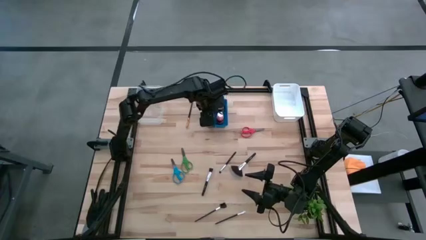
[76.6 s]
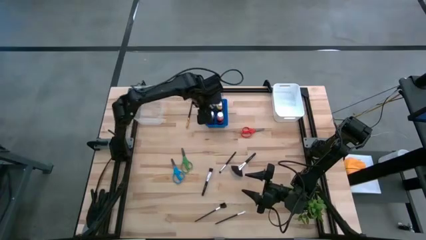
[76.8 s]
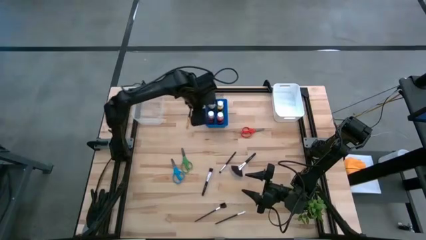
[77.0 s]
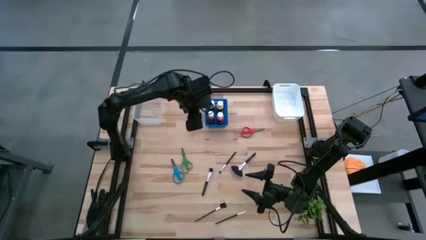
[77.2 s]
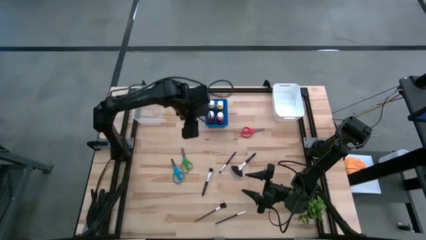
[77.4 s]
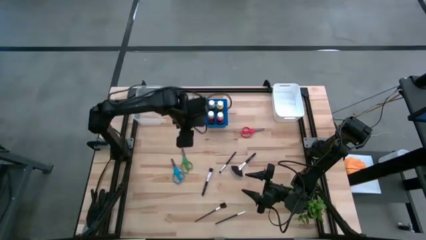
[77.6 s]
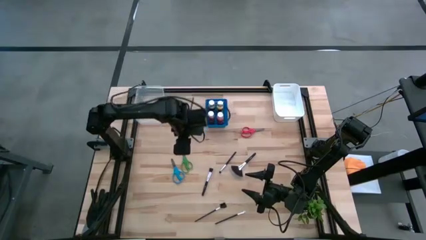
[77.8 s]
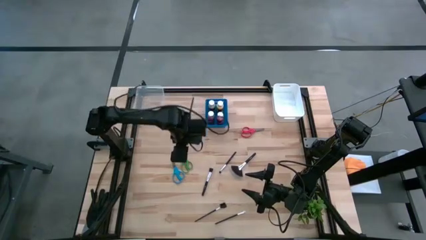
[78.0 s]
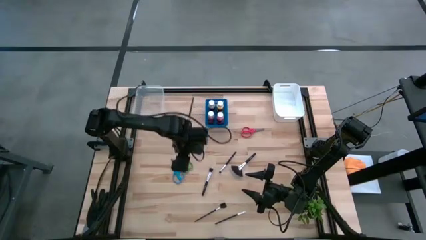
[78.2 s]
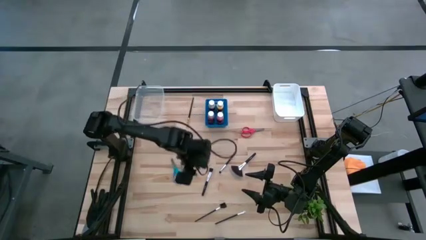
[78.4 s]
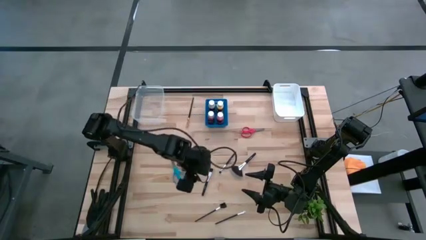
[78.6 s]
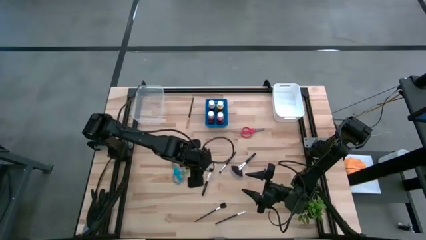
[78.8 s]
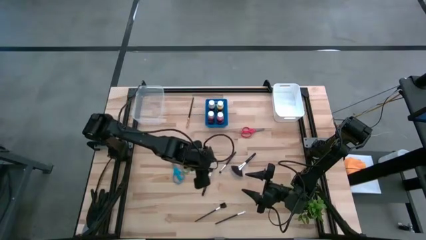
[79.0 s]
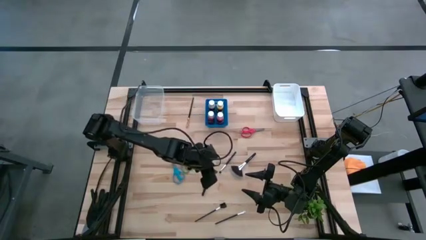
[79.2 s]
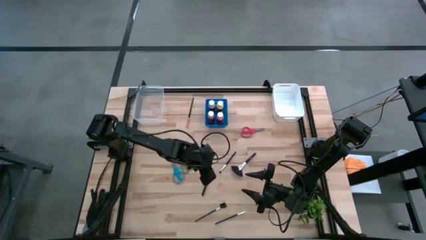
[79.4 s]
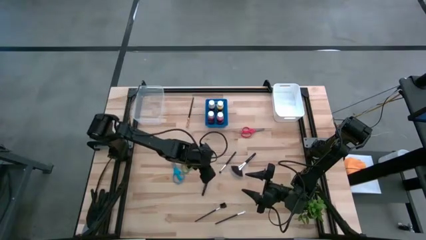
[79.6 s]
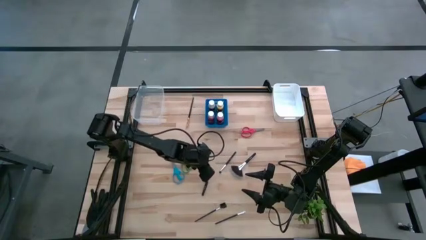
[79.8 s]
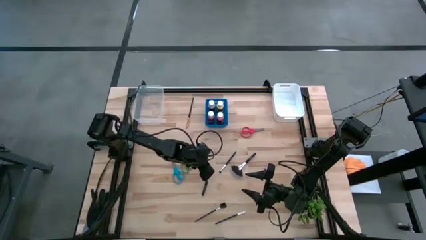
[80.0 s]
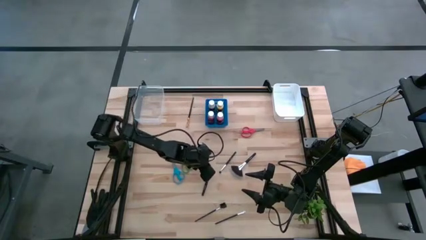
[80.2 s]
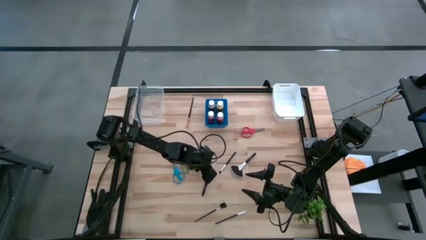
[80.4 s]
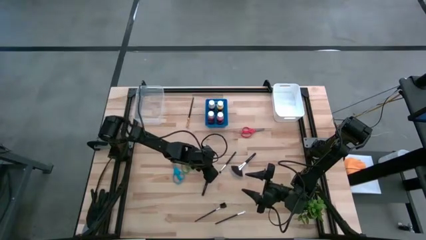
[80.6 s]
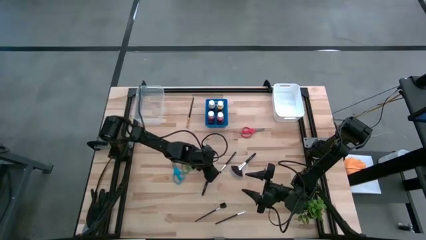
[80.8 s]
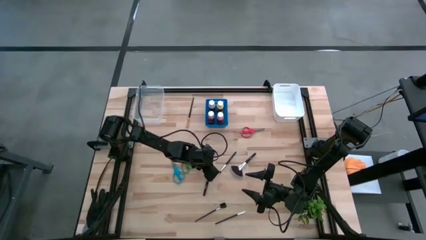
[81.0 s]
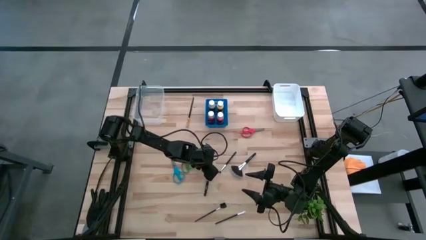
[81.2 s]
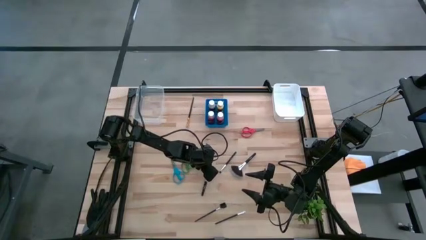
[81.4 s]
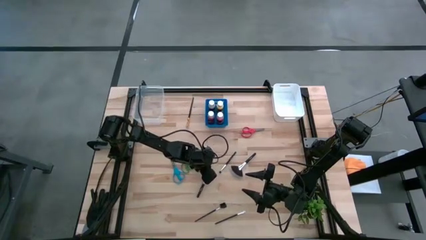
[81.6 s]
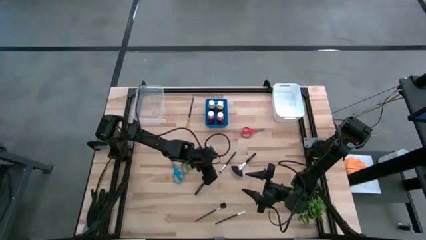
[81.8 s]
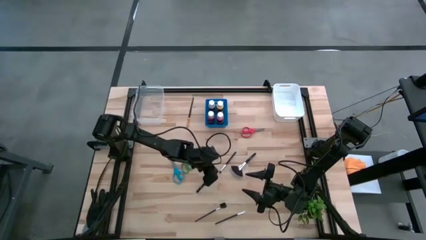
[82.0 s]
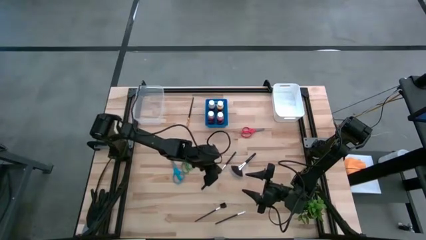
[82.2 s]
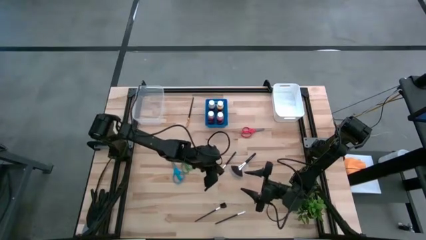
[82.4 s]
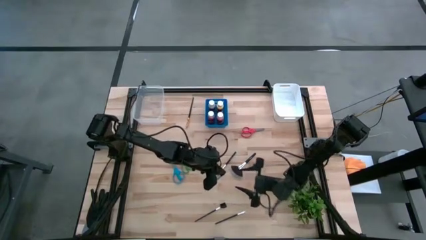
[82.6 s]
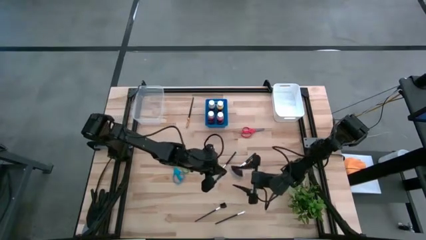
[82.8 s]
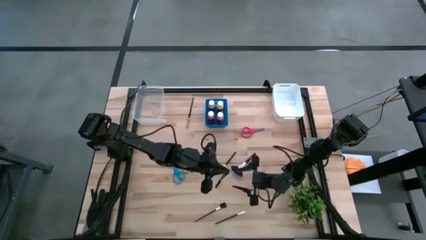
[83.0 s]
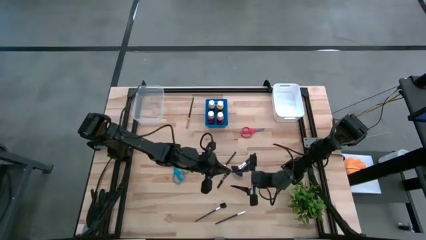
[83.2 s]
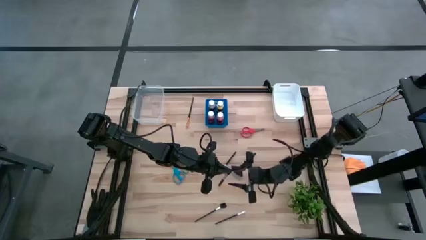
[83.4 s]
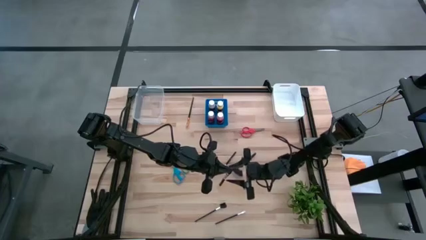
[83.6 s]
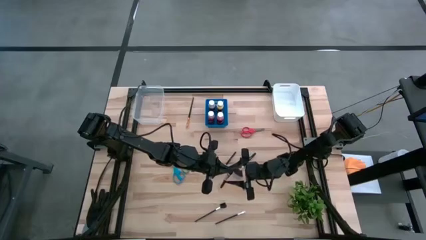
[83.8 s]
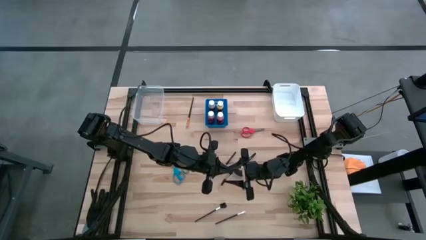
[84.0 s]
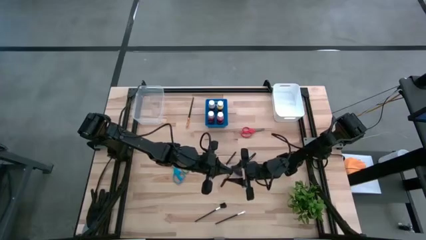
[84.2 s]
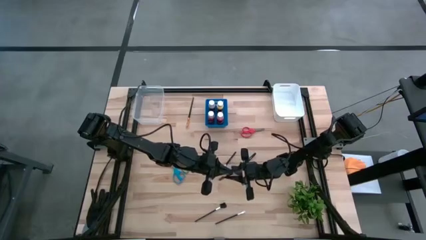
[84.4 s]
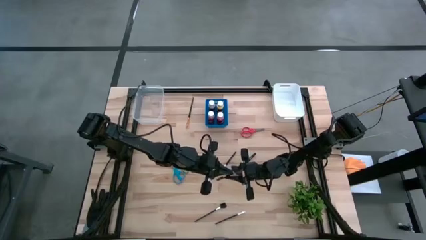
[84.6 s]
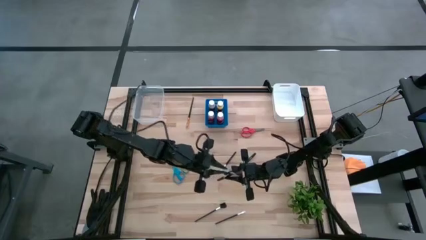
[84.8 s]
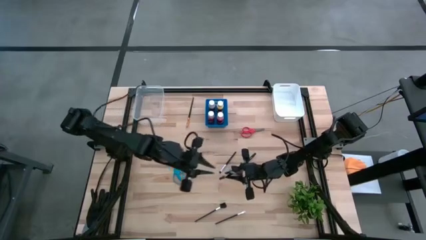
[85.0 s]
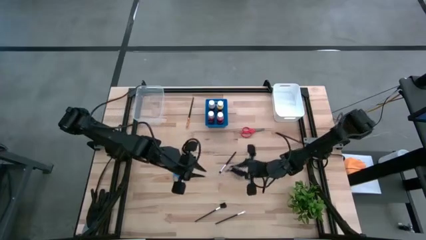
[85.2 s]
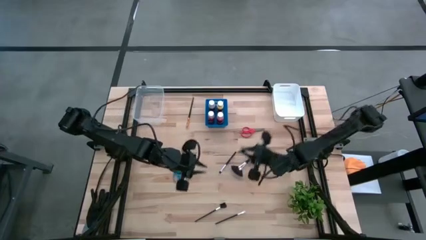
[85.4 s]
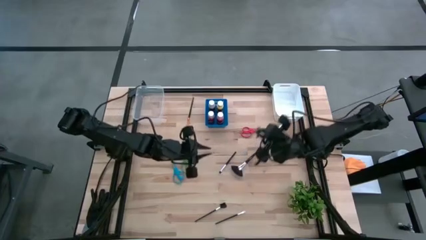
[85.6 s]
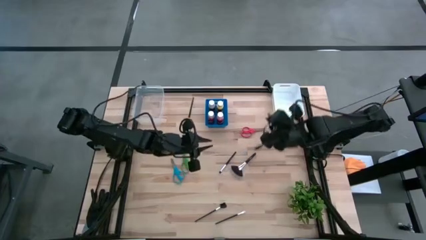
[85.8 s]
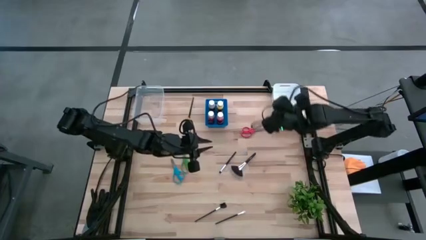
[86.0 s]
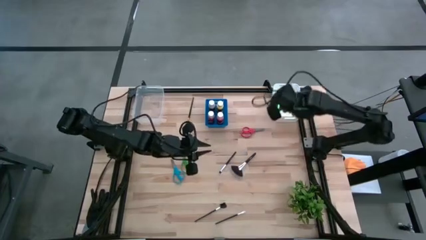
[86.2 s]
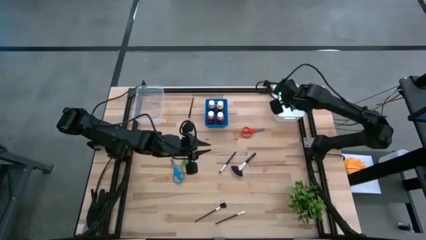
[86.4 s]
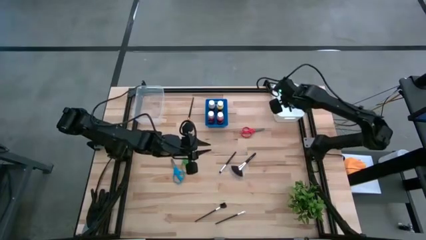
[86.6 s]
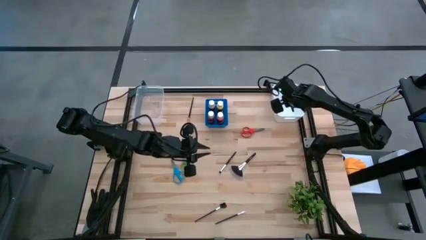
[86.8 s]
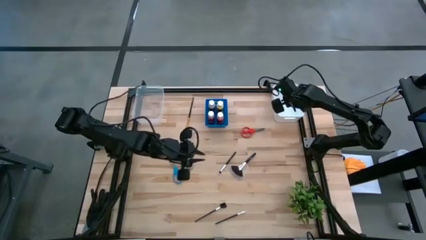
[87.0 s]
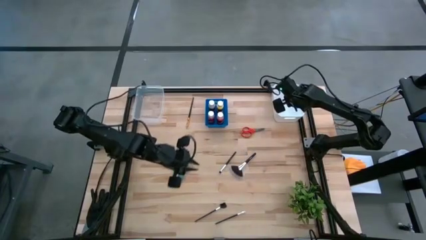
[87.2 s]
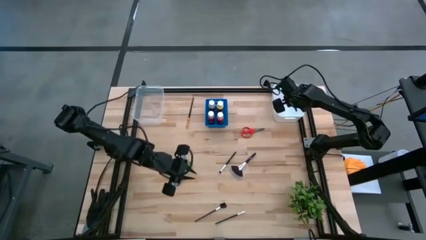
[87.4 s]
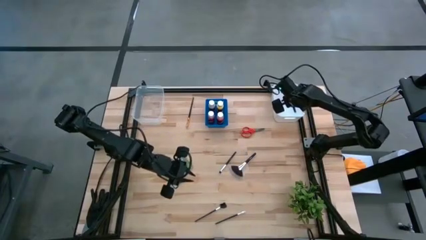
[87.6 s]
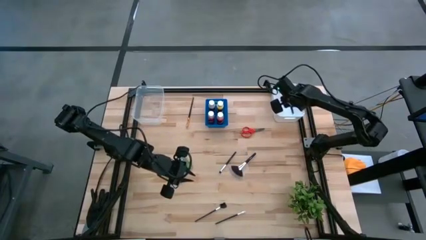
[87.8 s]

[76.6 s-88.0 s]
Task: Pick & Place Paint Supplies
Put the black powder brush into the white bin

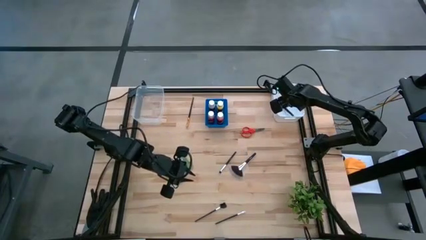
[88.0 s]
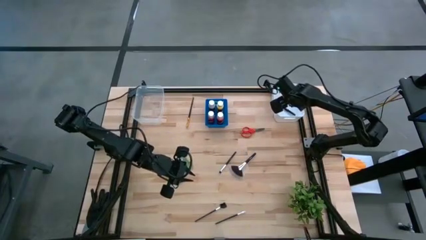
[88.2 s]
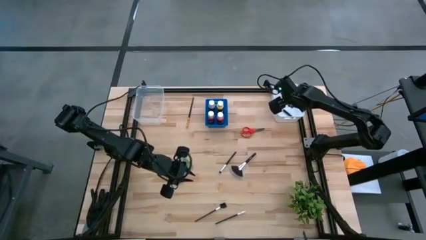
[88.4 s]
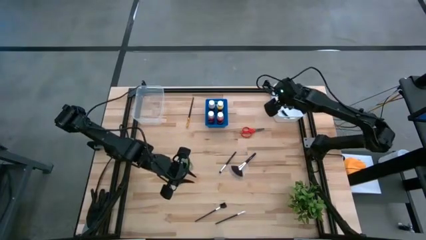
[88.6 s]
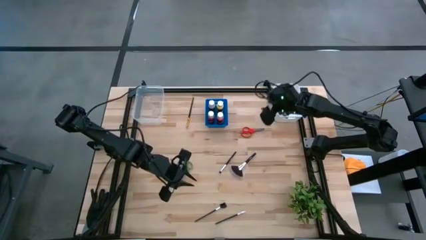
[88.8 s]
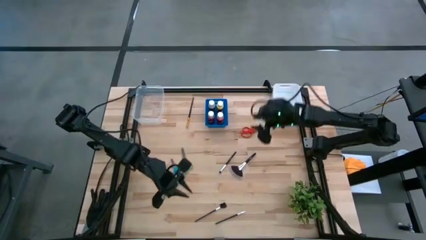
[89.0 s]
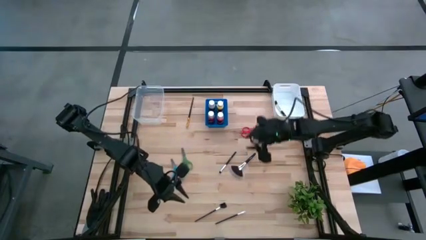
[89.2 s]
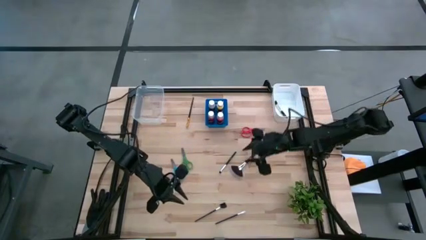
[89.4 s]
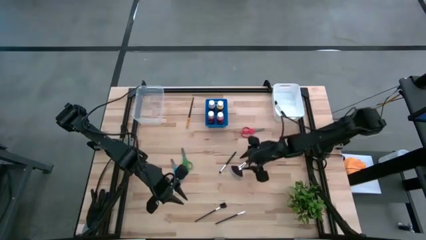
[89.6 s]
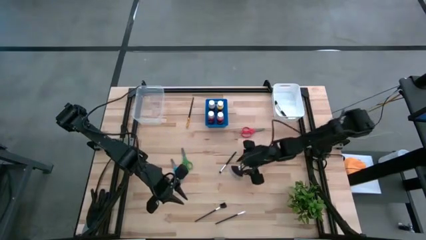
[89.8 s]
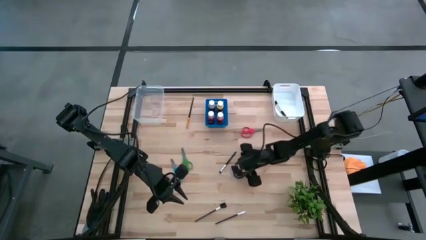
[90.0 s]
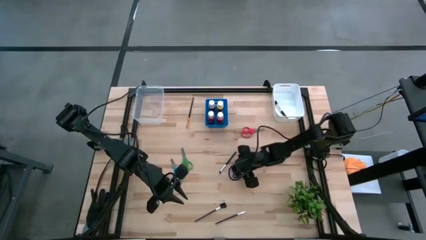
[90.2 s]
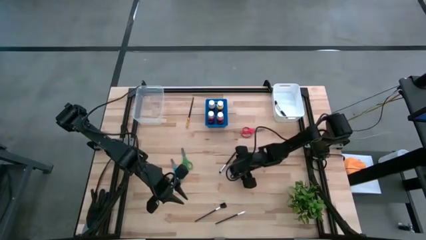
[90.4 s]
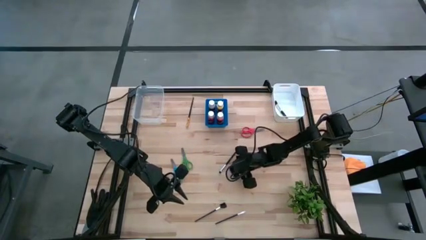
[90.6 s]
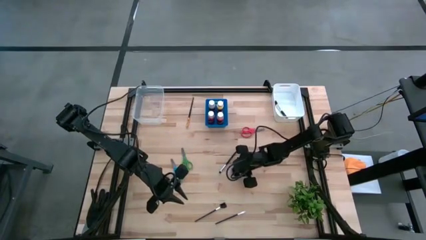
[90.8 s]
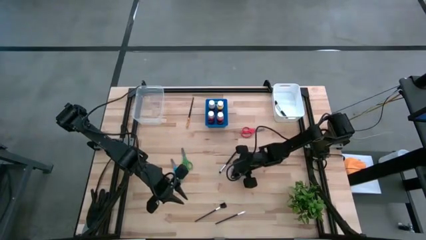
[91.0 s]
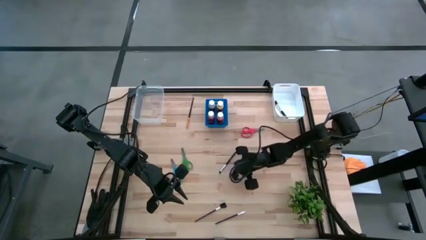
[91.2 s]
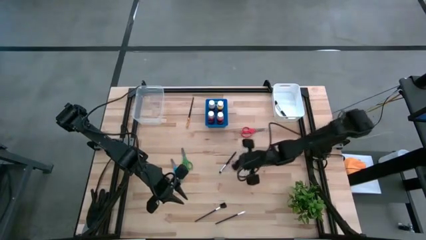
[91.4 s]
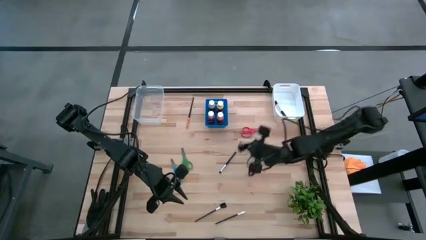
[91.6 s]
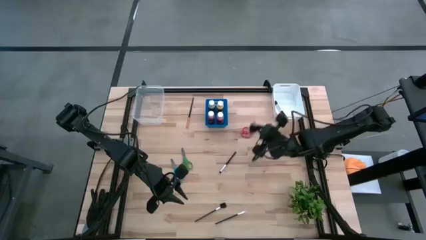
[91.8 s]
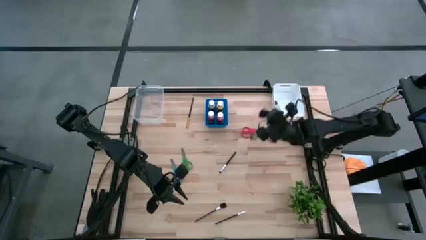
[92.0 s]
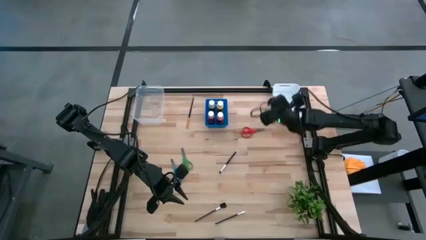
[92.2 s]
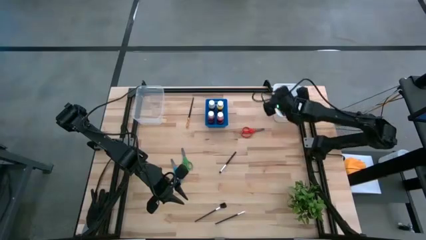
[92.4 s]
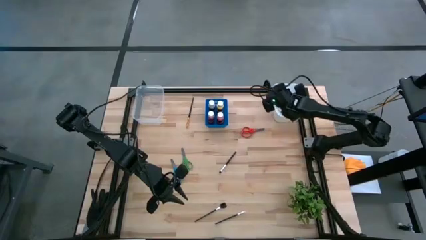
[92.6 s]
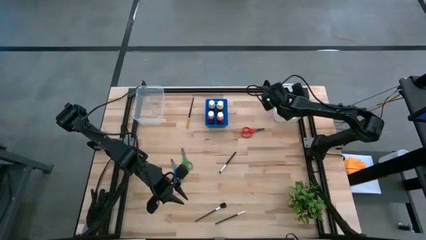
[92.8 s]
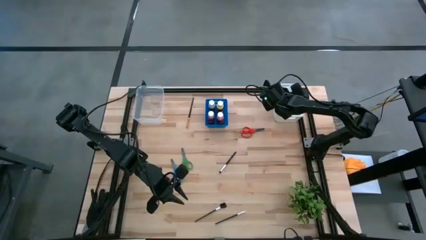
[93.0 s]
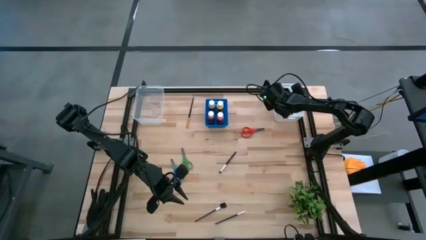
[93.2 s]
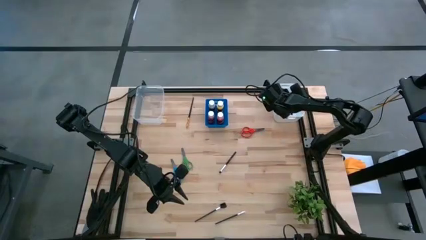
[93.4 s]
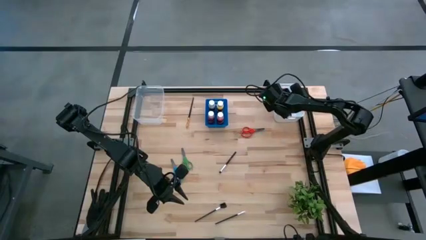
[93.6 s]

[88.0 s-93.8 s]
Put the black highlighter brush into the white bin
